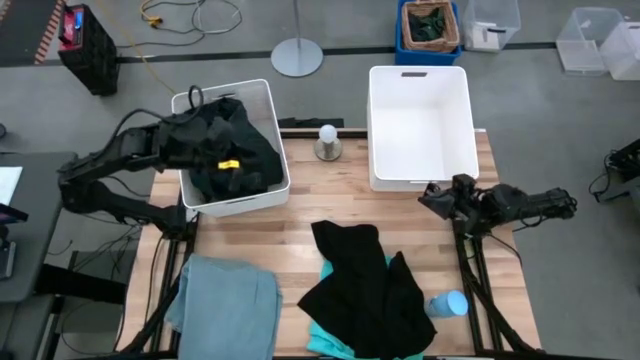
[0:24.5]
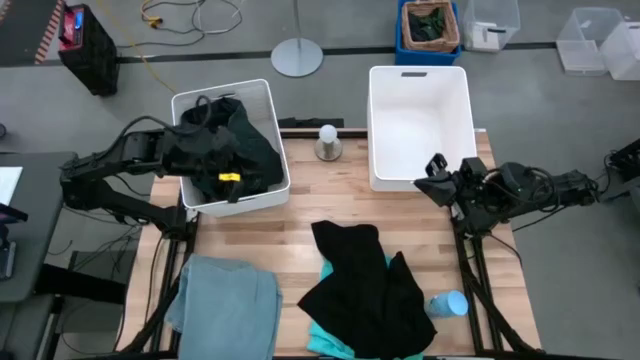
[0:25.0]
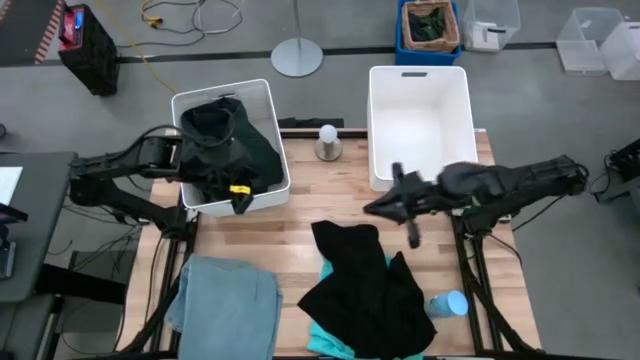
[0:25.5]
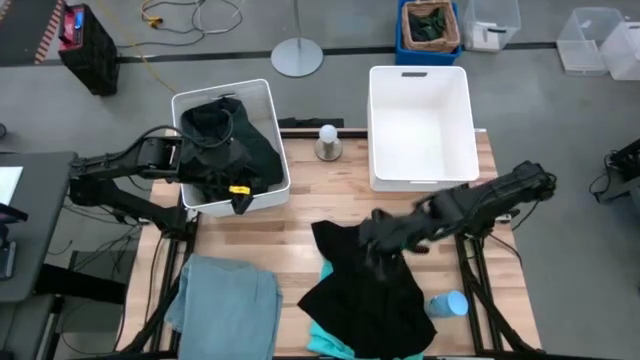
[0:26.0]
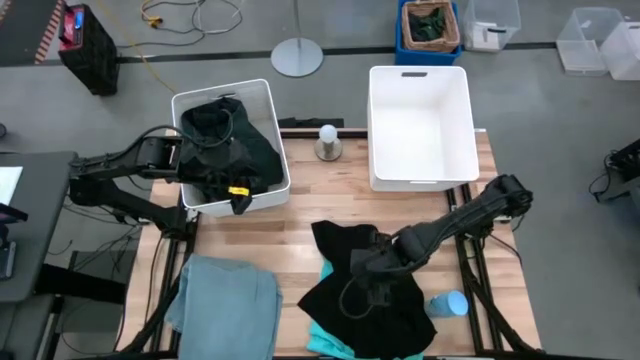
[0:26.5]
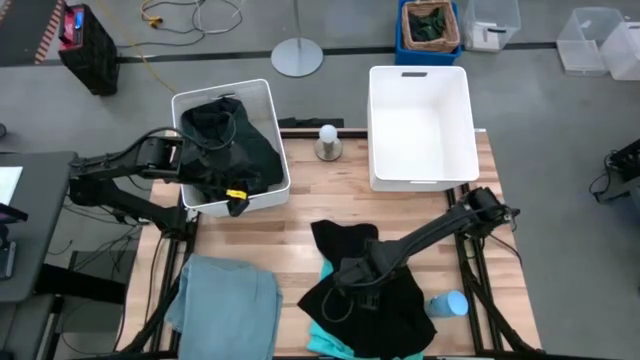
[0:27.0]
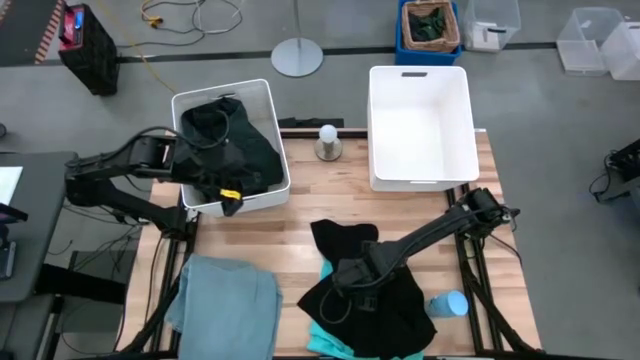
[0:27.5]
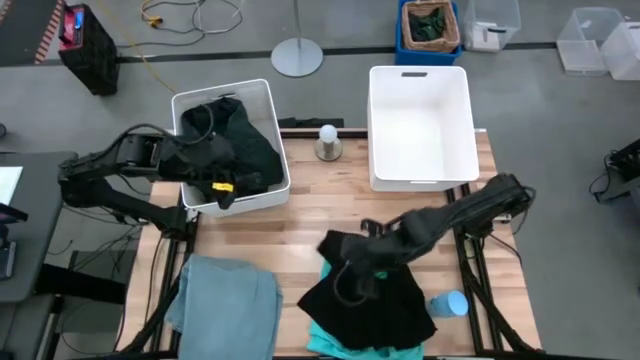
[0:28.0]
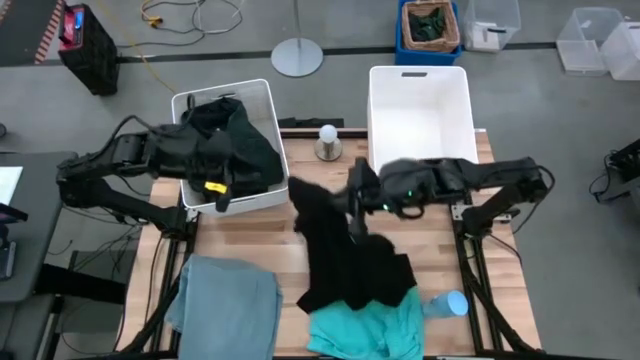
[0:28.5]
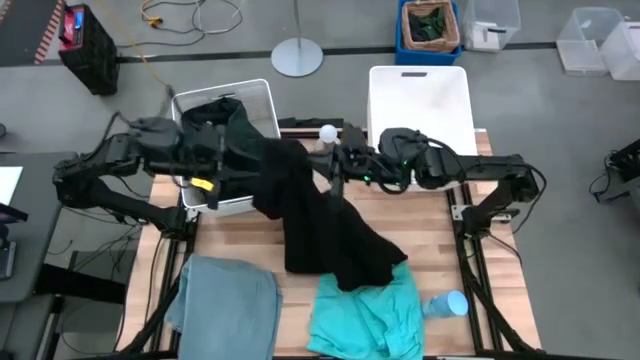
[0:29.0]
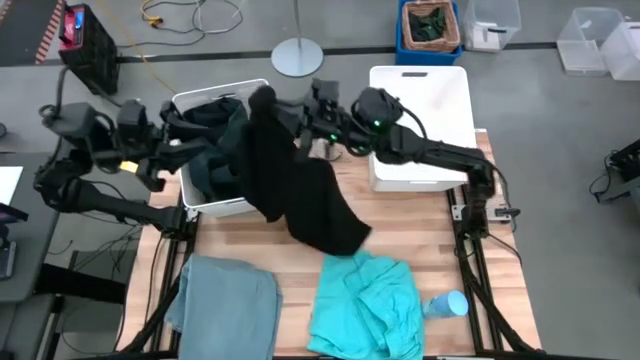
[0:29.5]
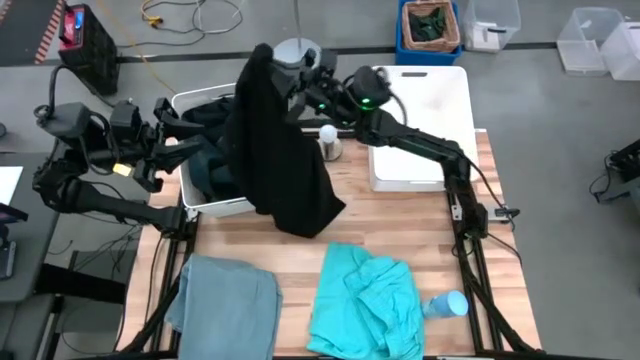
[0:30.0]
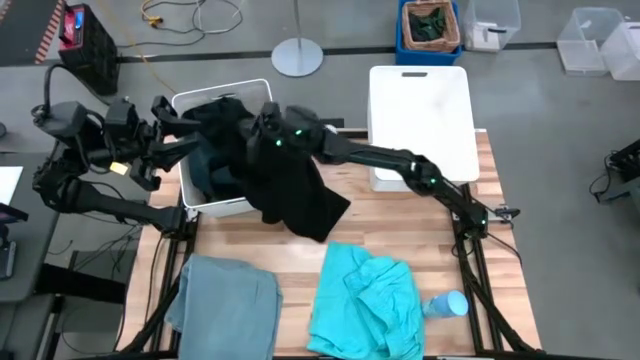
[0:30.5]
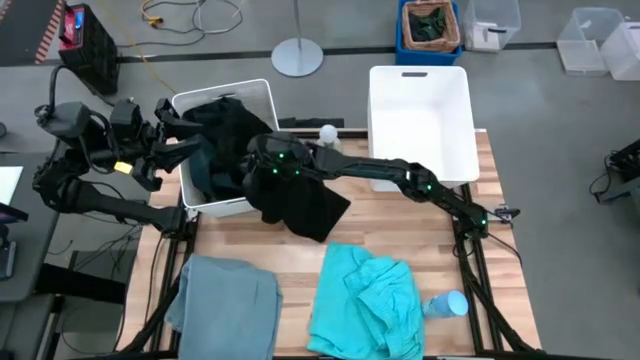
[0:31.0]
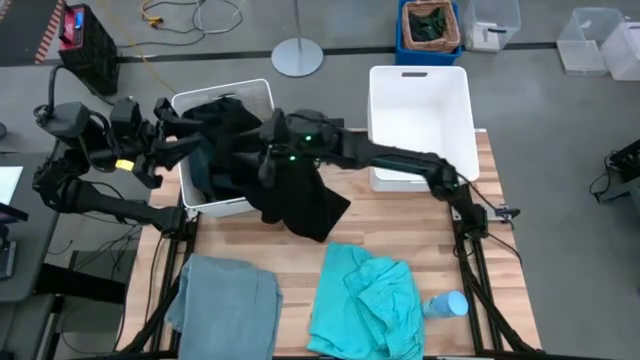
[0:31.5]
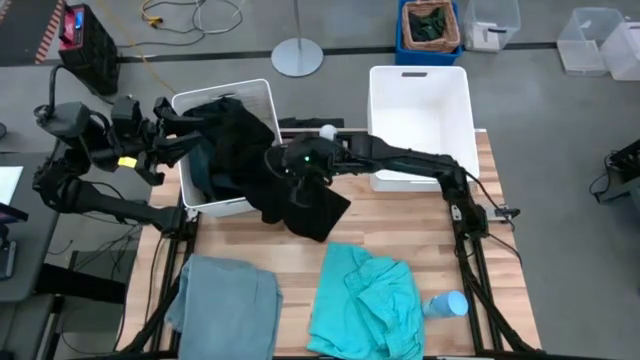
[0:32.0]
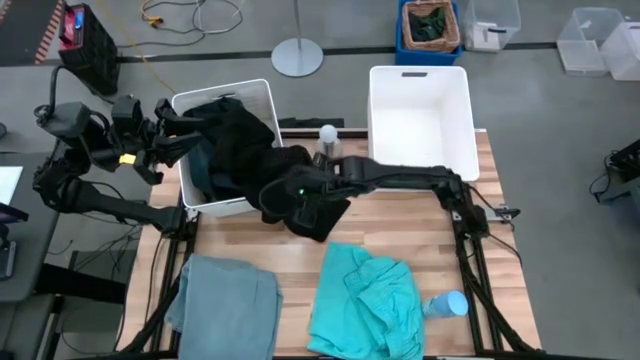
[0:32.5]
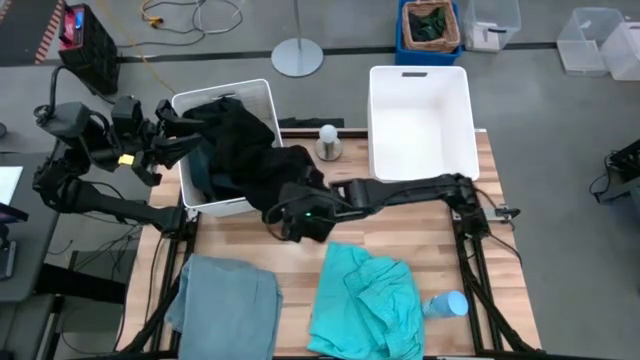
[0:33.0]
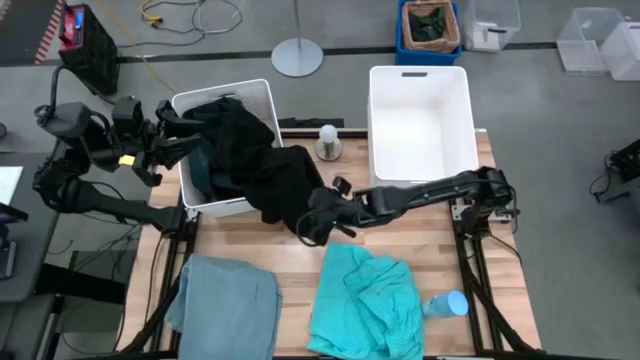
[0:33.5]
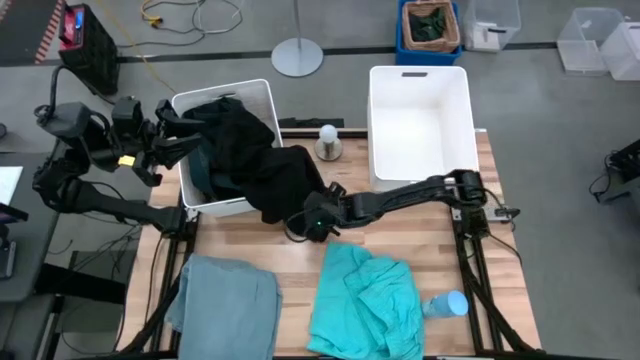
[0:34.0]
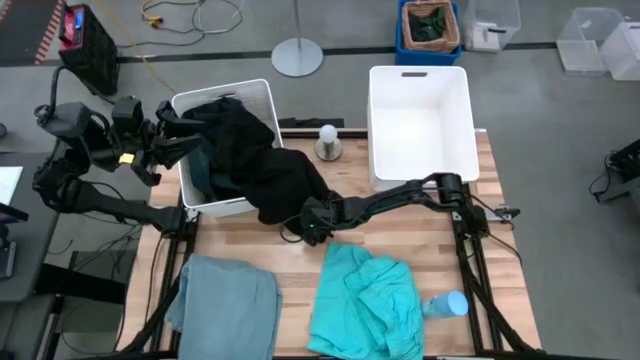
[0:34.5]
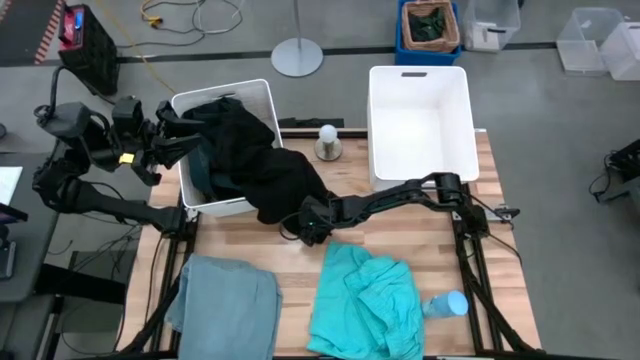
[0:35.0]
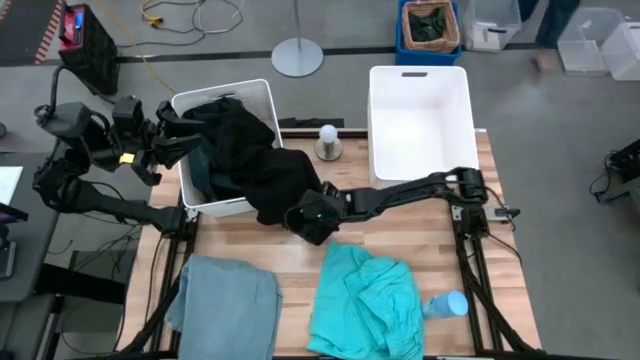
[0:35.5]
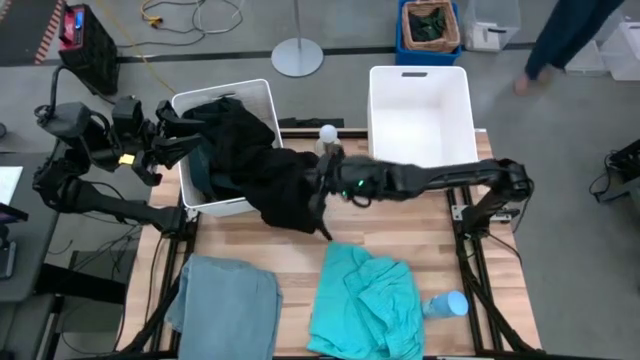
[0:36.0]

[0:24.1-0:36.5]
Task: Sort clothes
Put the black shirt into the left white laundry bin

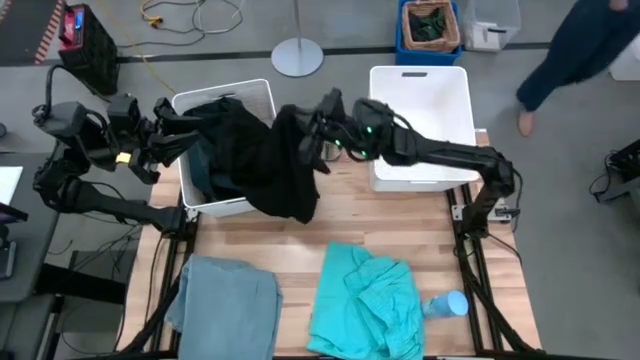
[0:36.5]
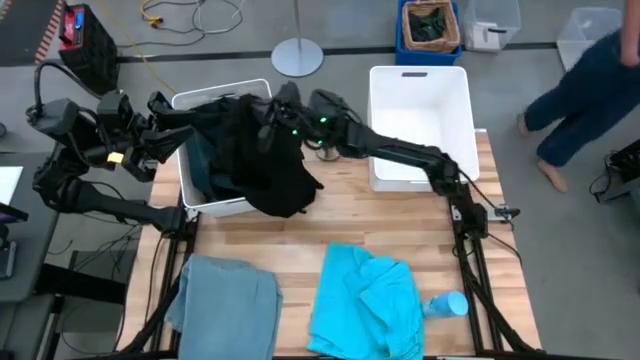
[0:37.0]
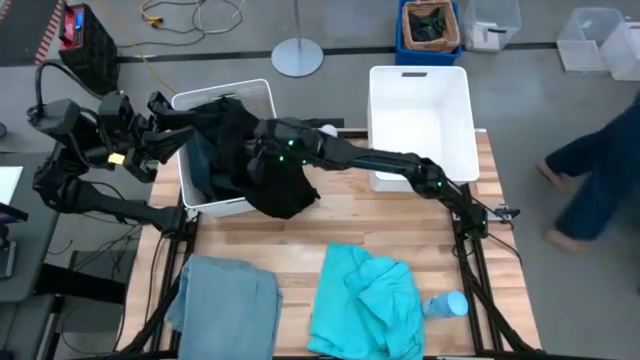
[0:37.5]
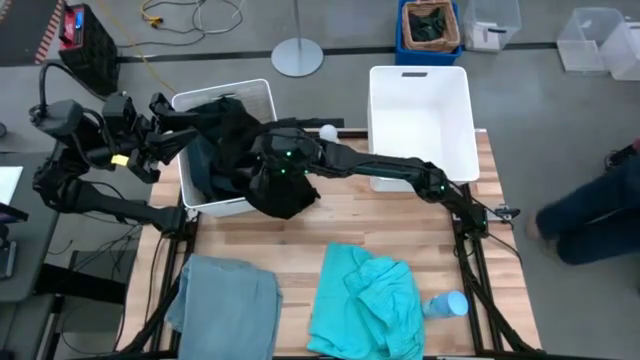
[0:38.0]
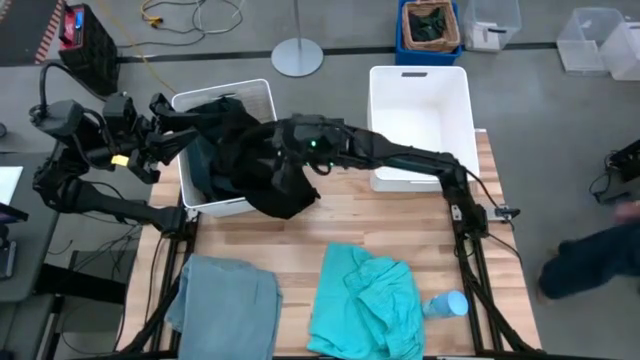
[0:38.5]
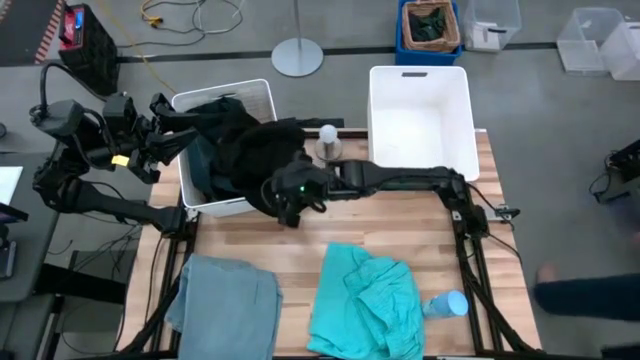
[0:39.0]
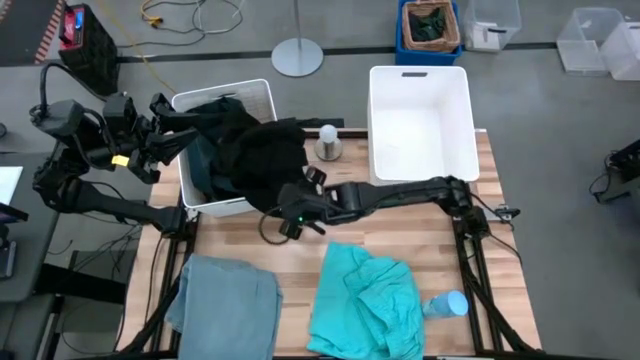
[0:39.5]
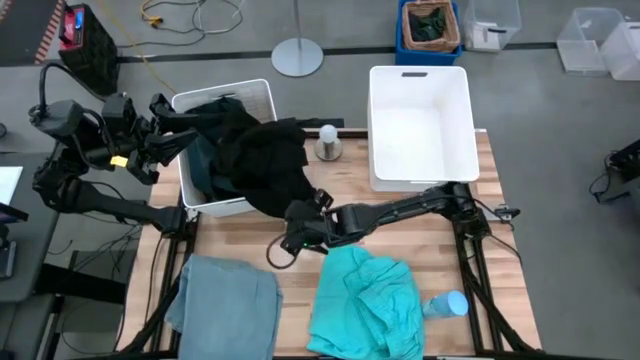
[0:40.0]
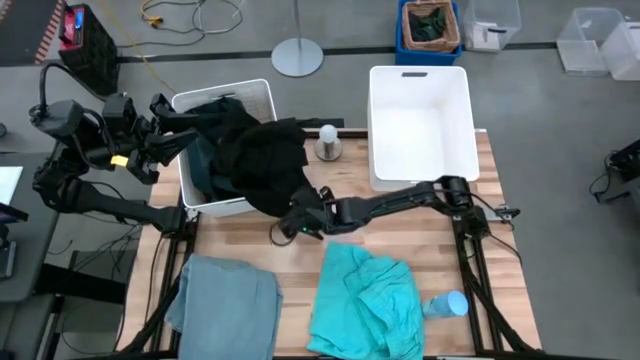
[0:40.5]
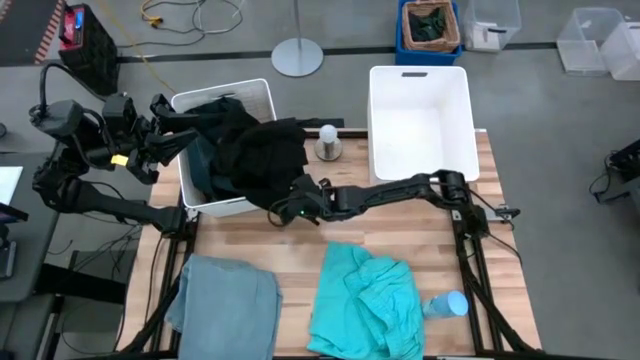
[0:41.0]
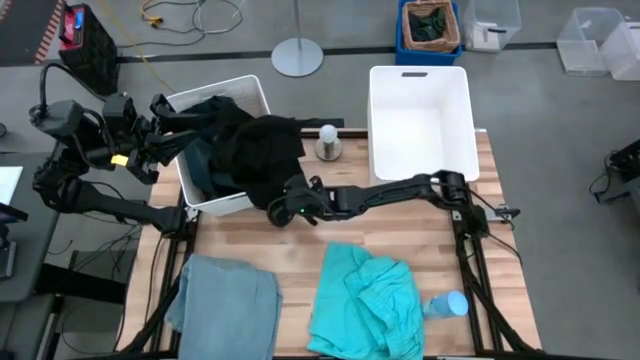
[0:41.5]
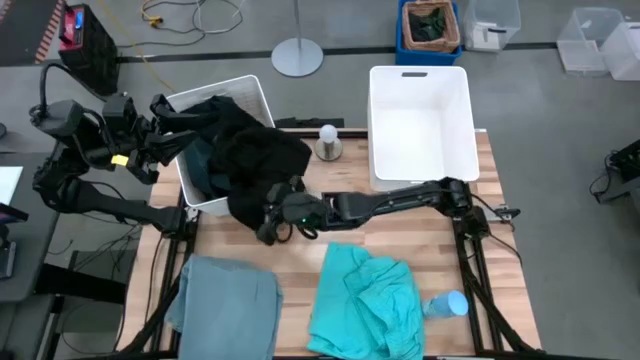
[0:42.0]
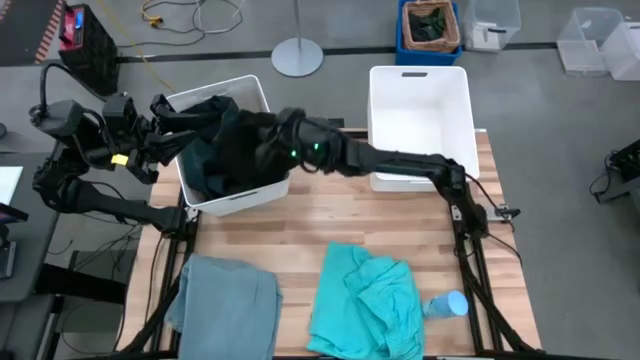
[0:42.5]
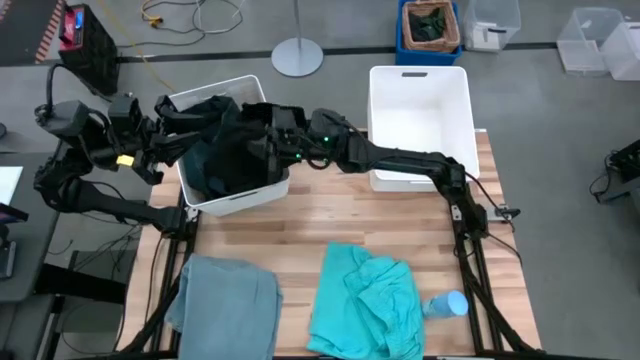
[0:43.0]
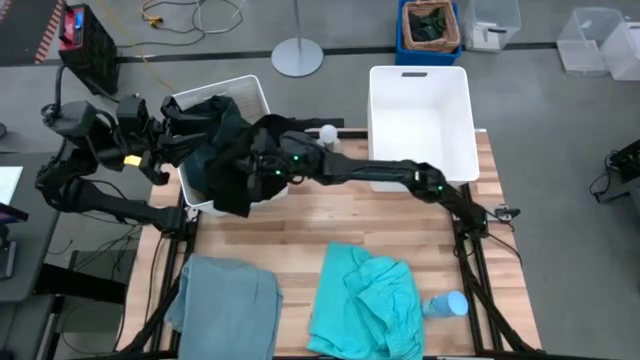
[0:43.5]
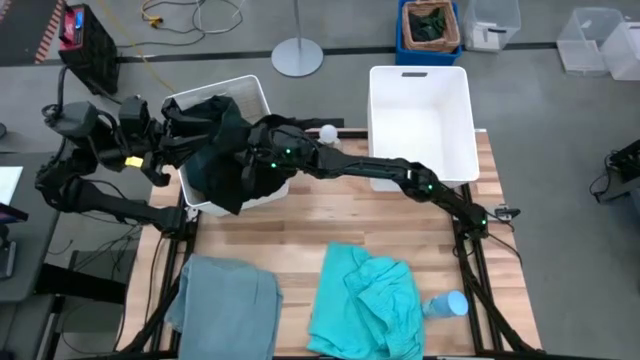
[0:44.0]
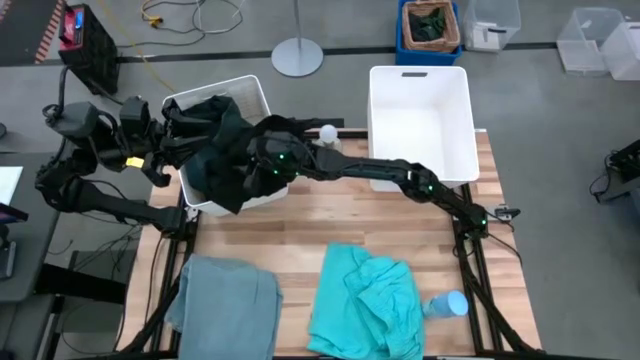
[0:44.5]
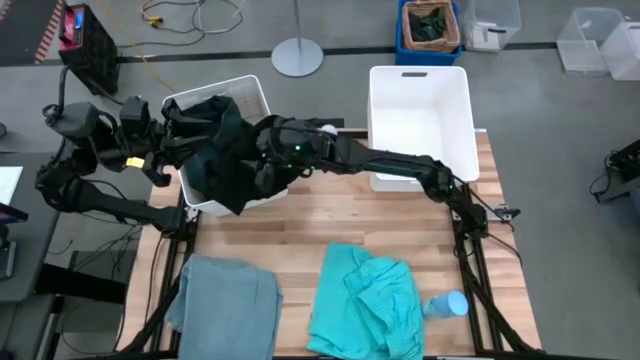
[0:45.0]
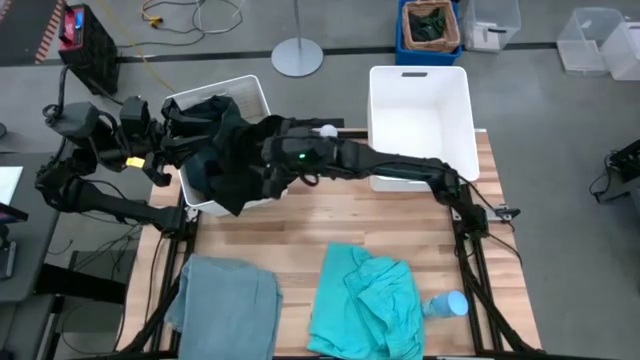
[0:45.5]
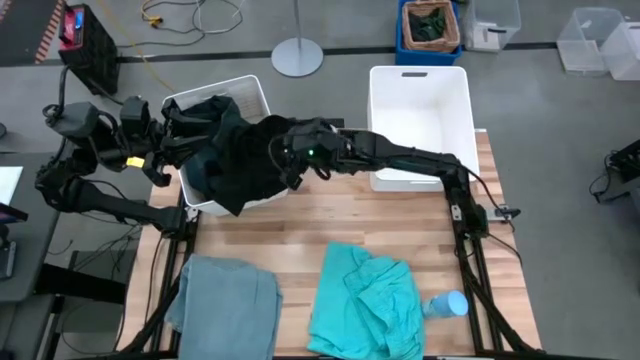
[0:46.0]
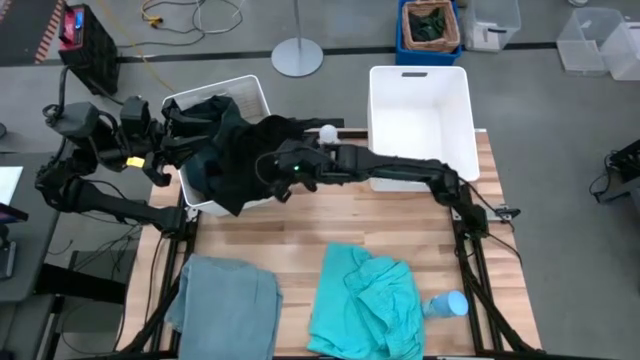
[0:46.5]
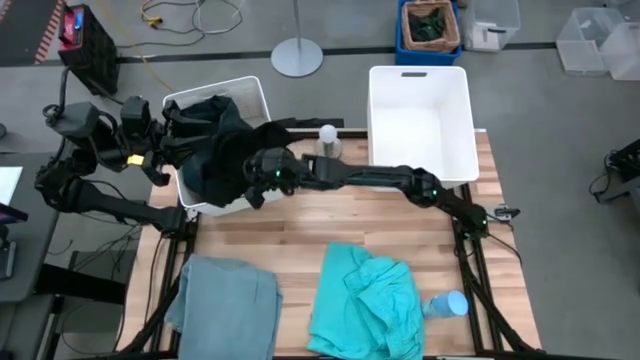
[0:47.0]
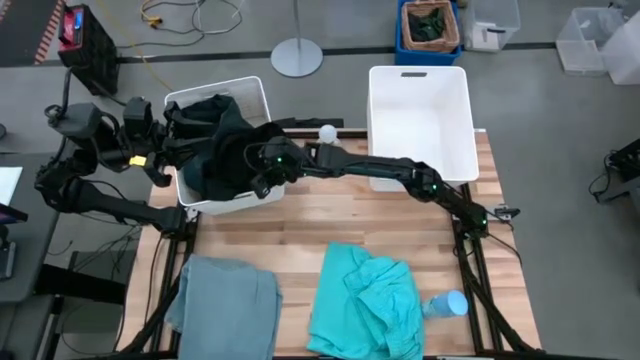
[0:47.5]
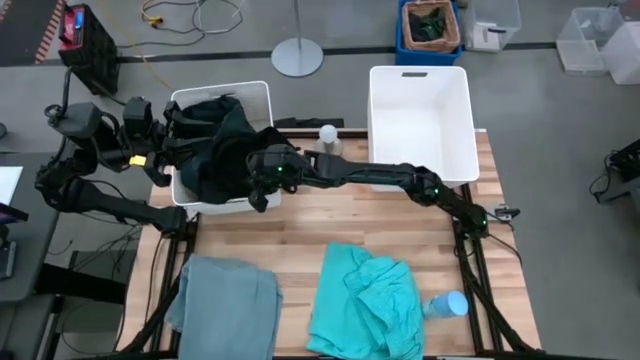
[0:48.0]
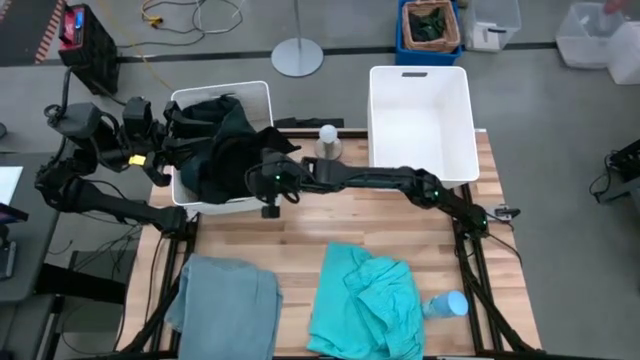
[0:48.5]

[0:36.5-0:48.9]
Put the black shirt into the left white laundry bin
